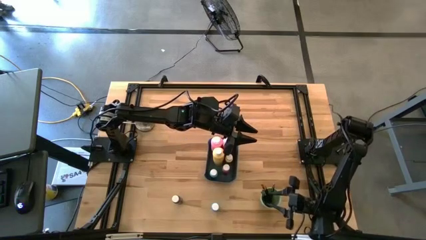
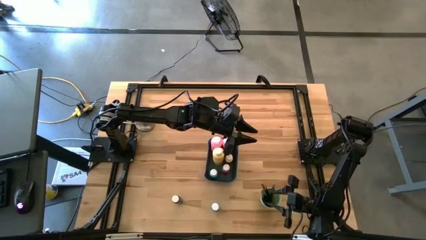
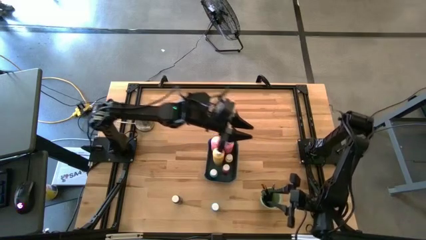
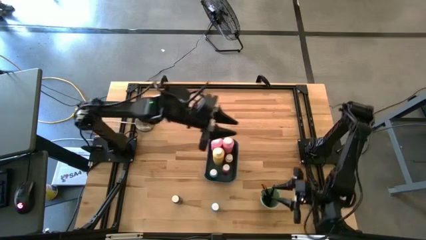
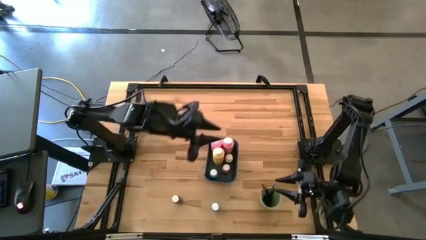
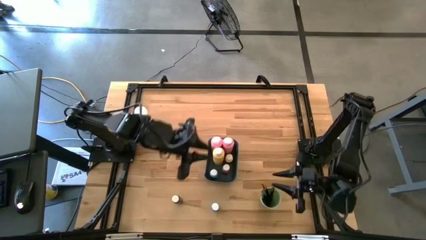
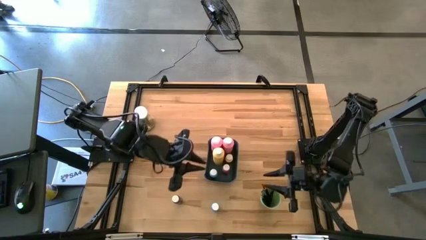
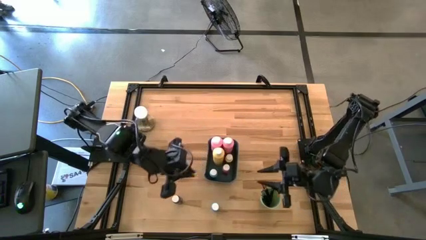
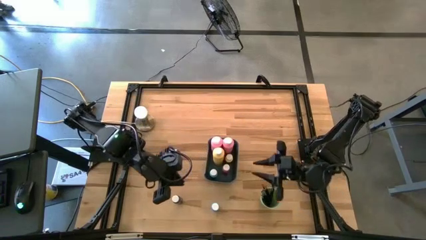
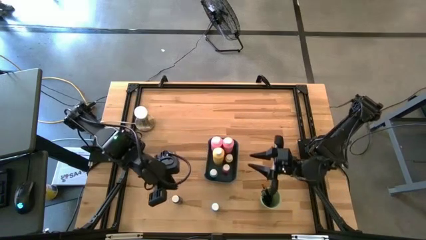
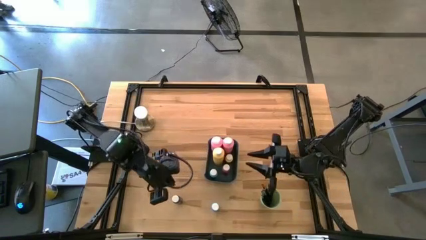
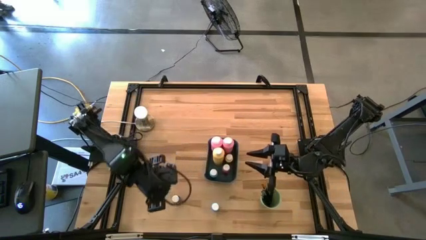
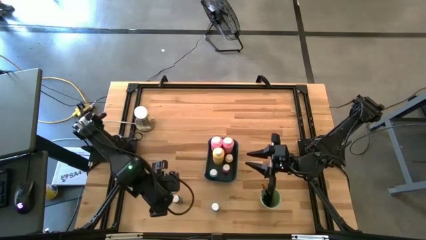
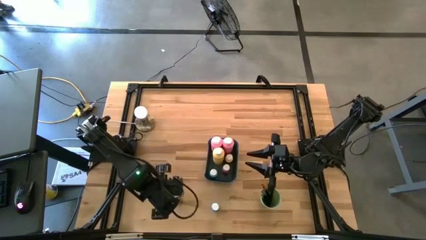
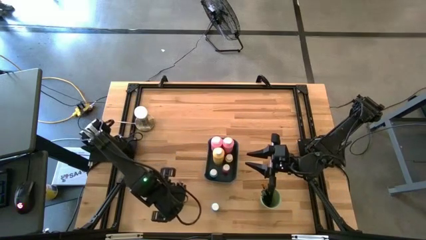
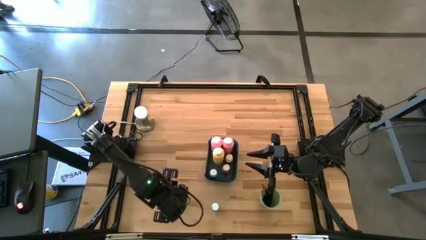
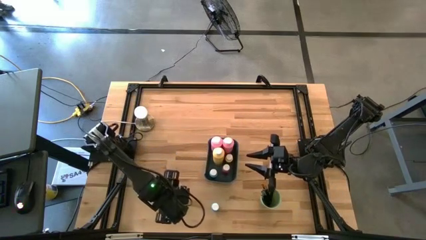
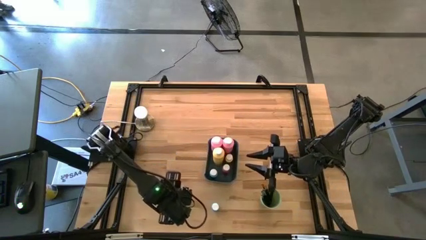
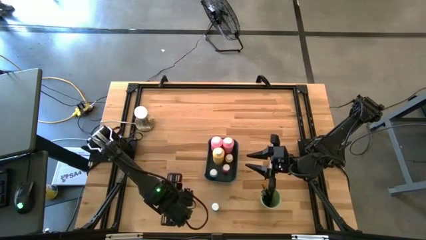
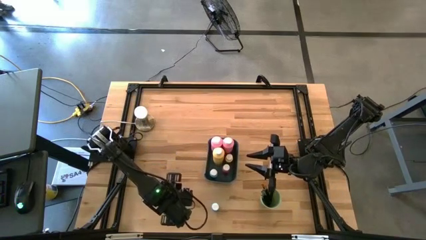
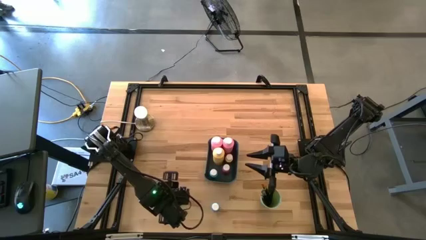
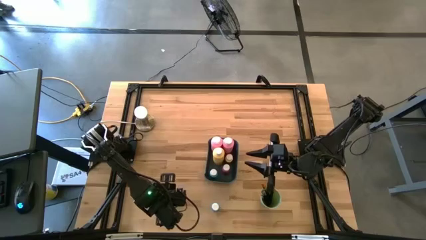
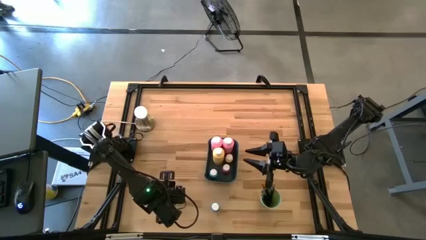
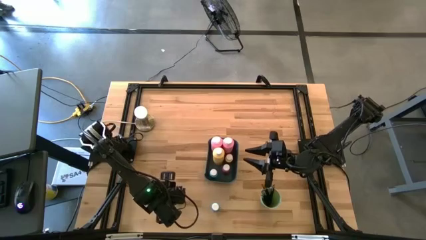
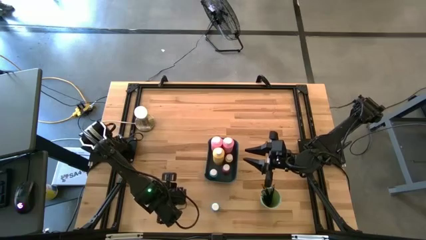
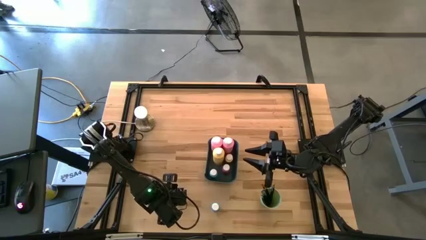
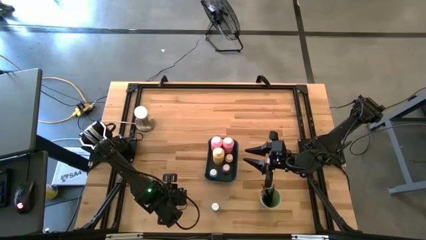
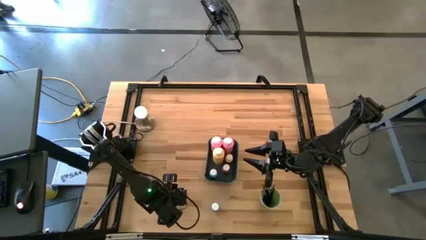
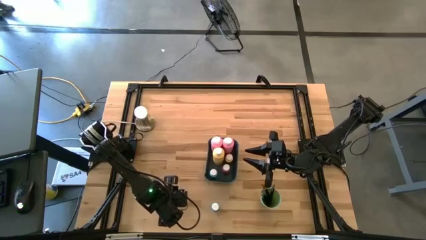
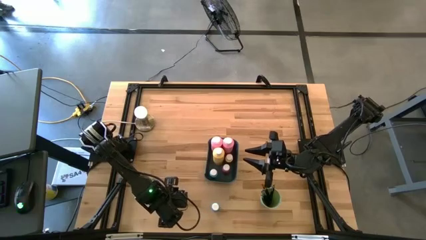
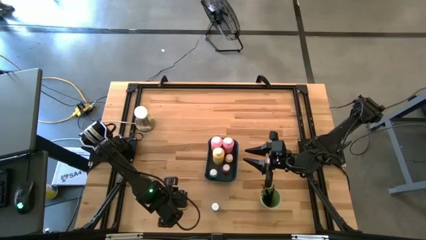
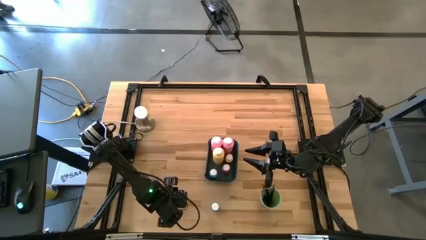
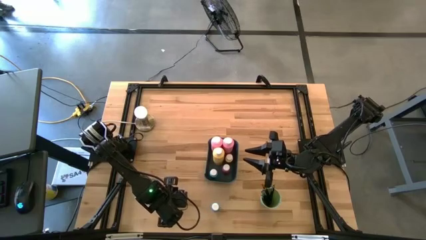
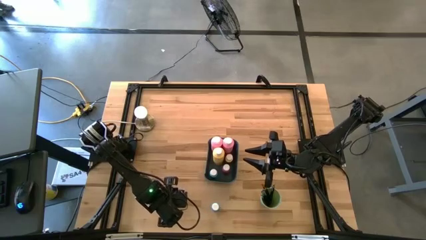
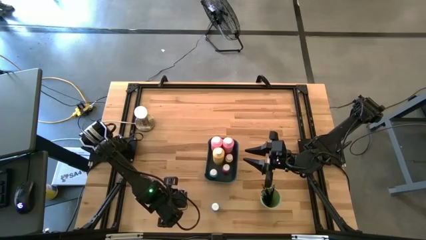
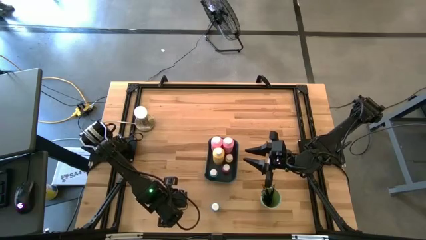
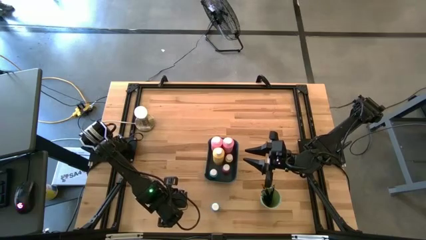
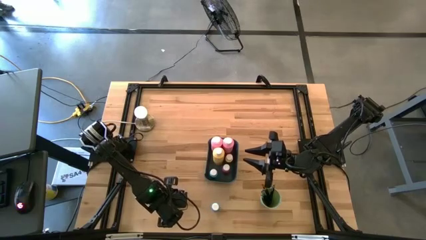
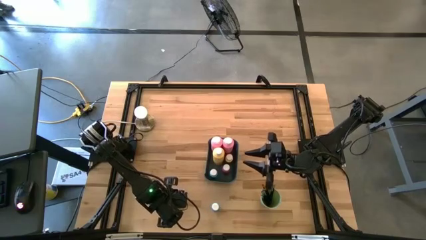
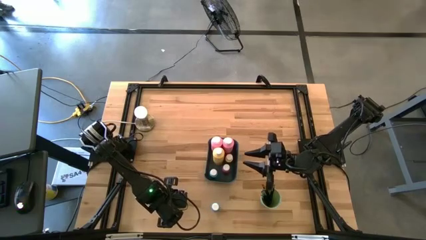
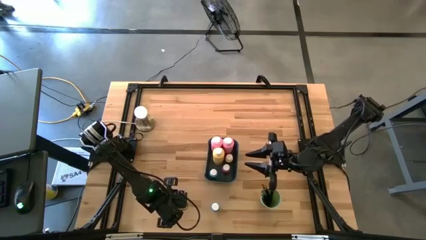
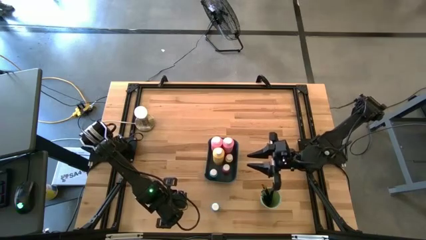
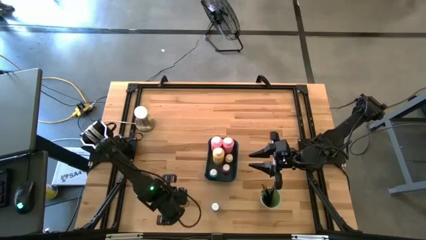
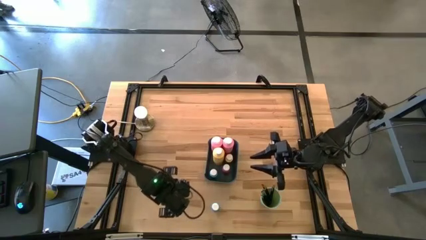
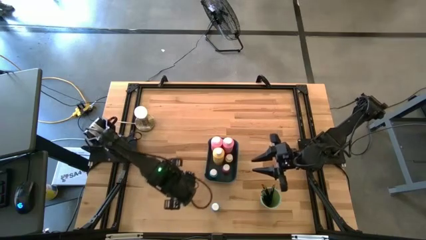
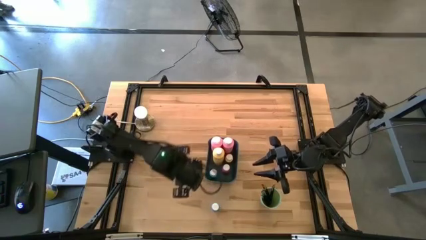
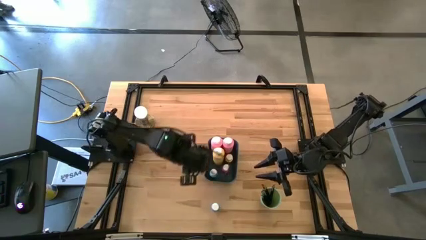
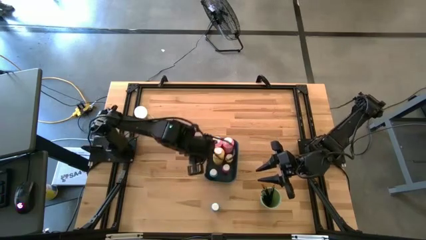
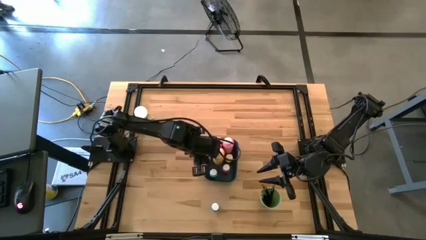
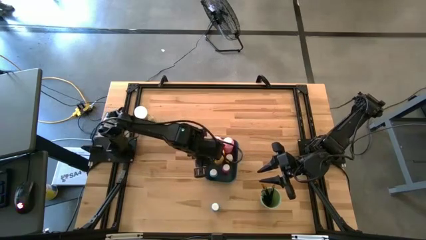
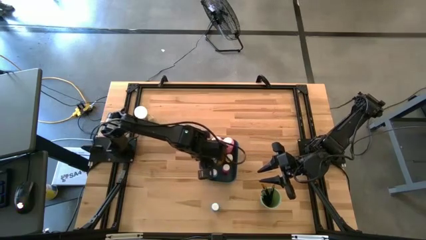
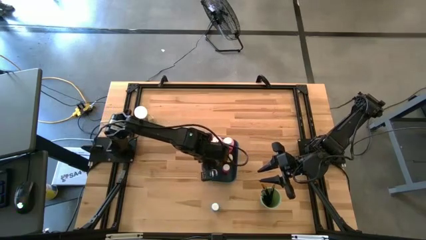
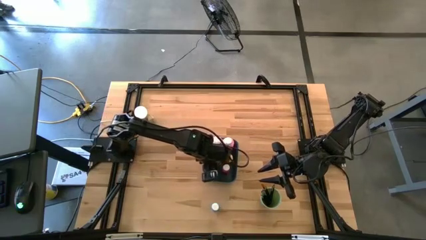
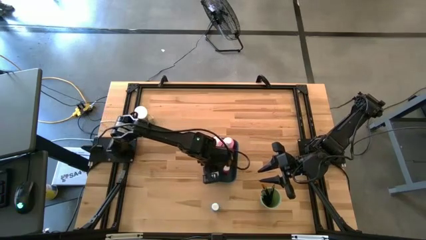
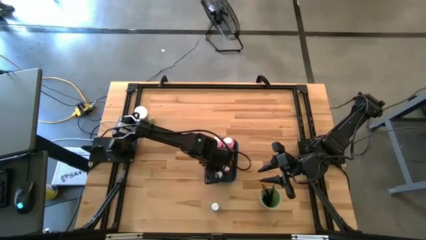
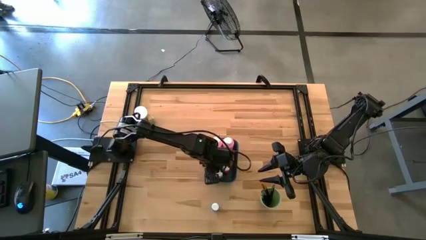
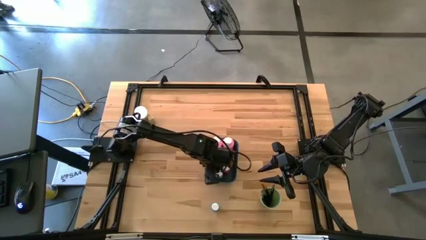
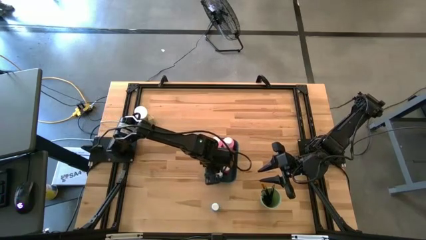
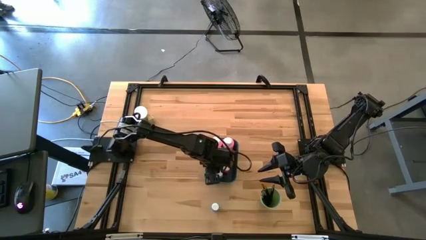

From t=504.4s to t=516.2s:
Task: Pick & Place Paint Supplies
Put the small dark blue and black paint bottle into the blue bin

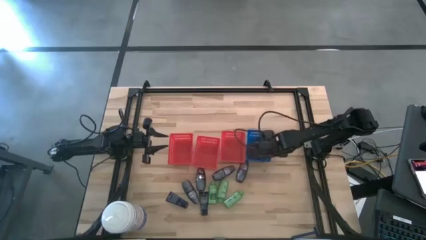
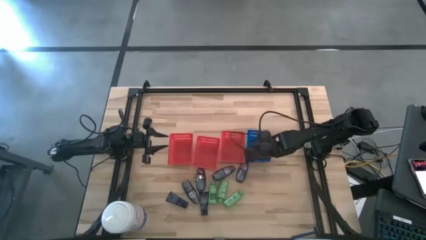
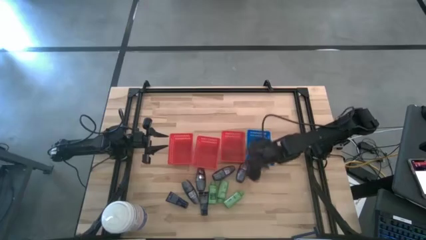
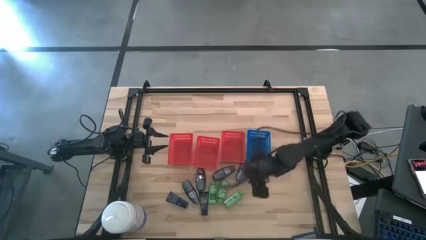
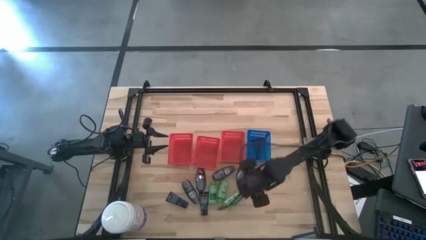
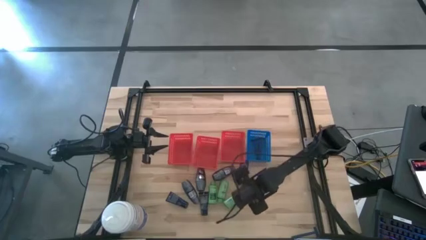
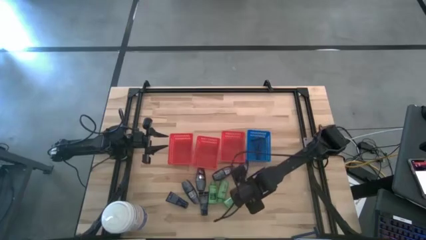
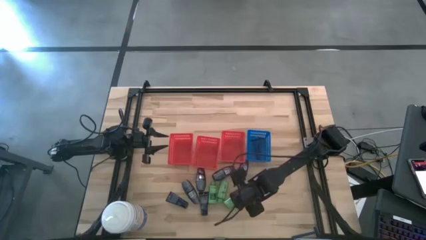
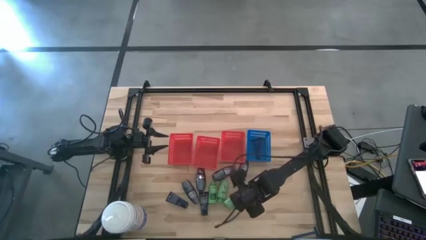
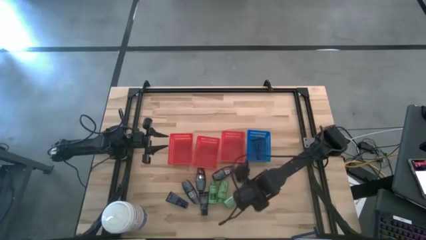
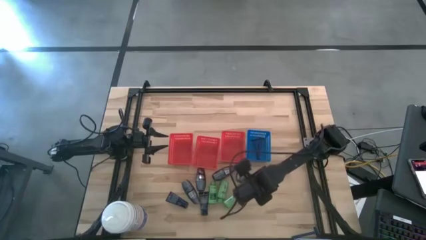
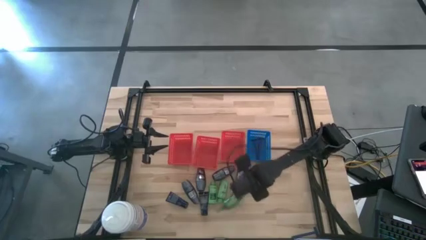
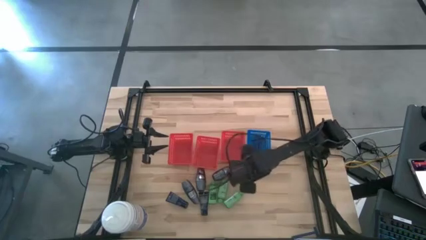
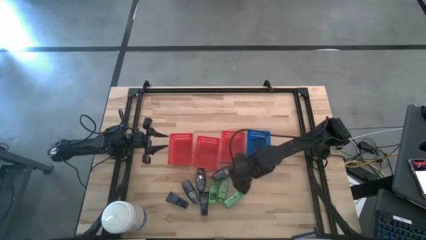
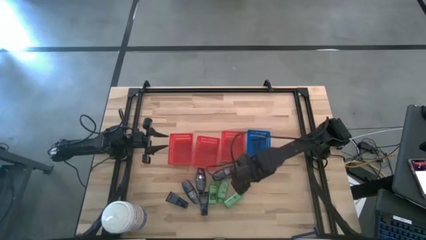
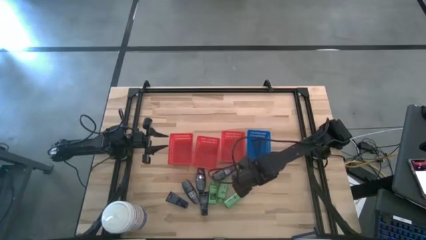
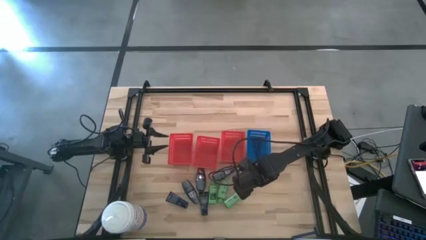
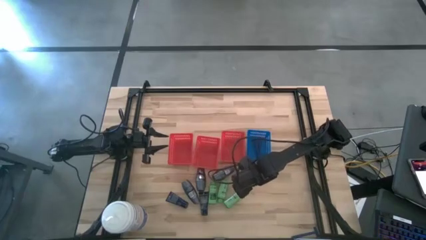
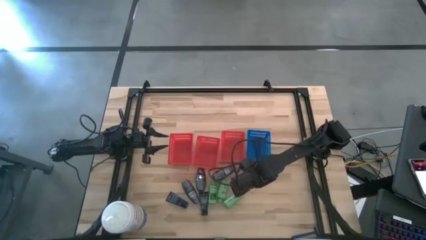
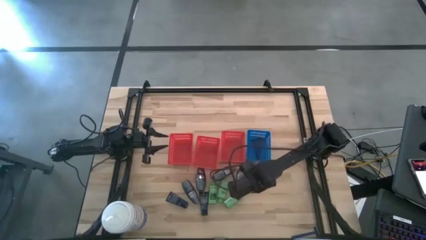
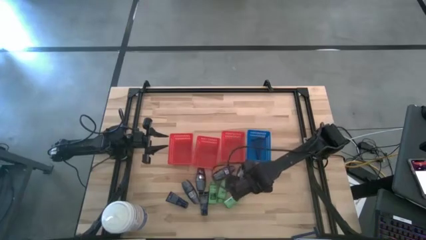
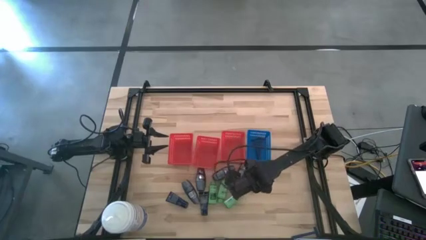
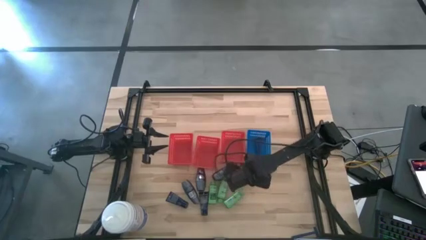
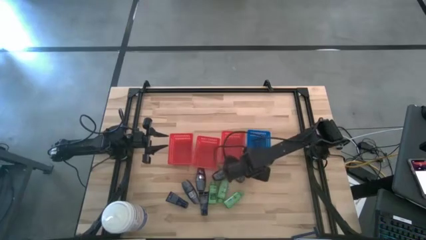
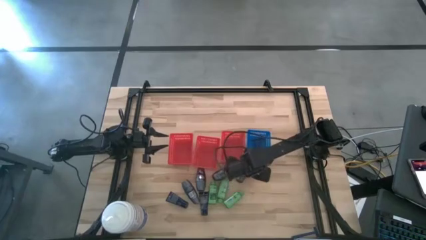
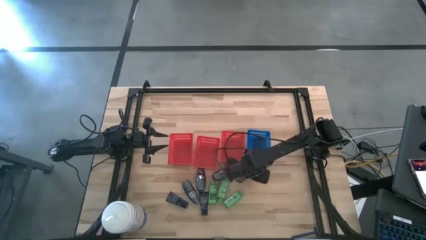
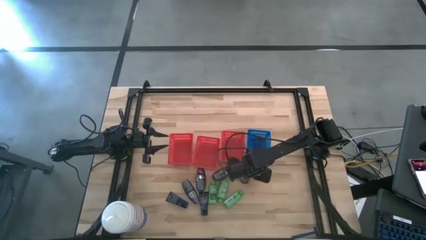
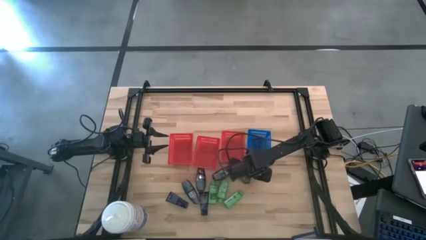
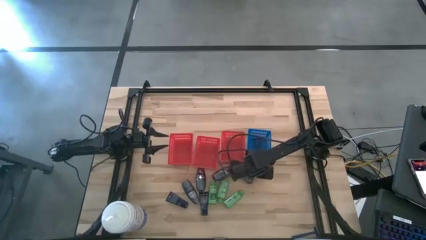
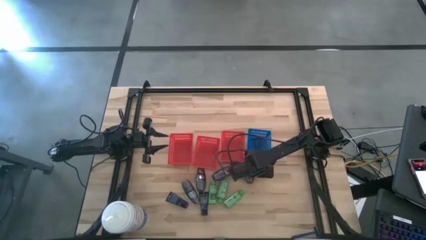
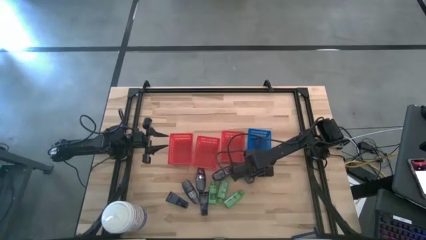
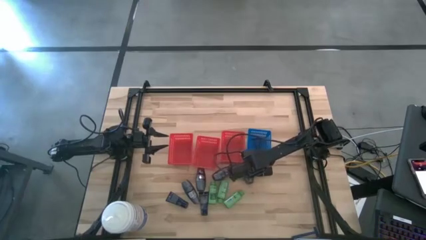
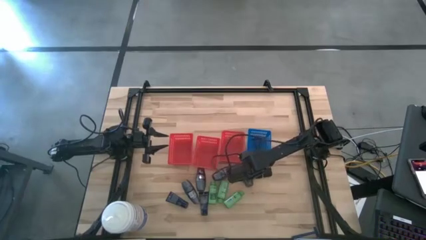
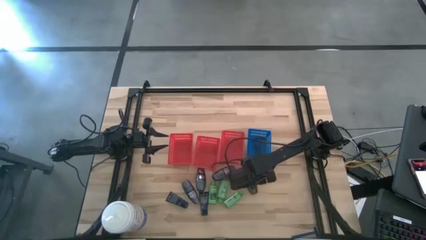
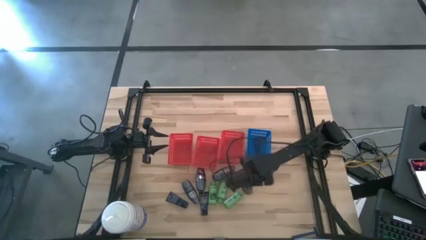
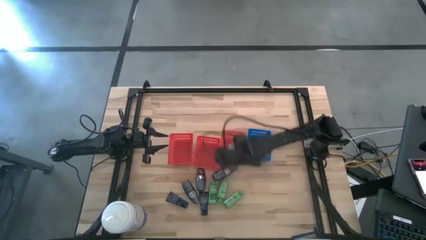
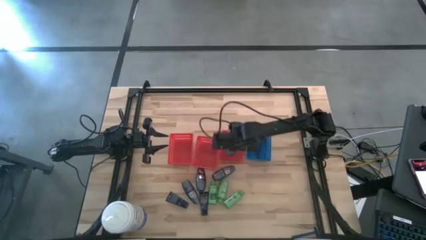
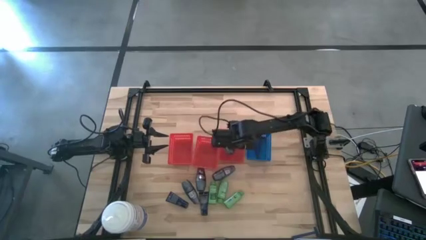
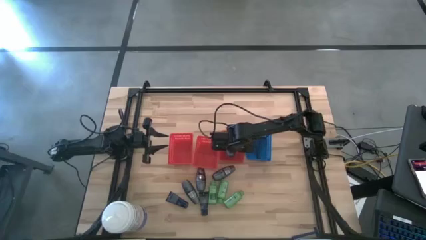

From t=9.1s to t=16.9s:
Task: Pick & Place Travel size toiletries
Put the deodorant into the right red bin
